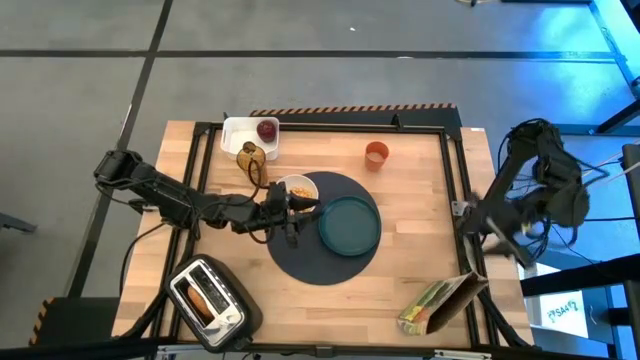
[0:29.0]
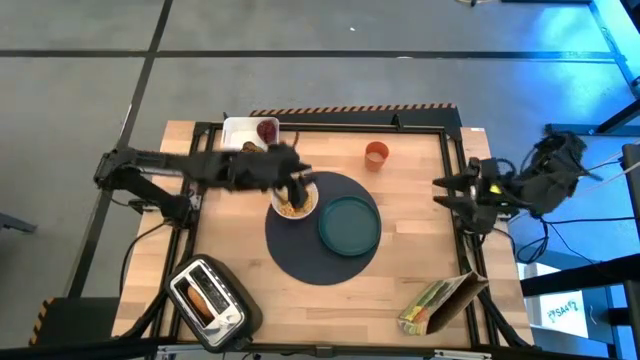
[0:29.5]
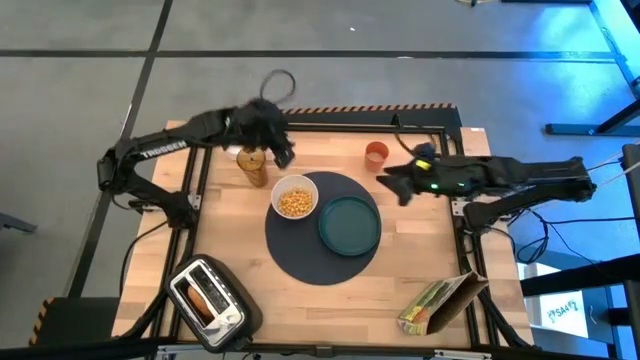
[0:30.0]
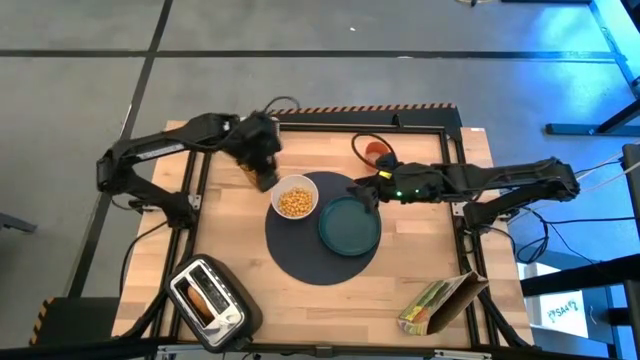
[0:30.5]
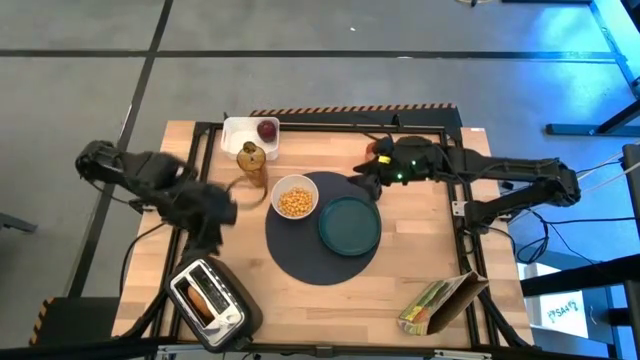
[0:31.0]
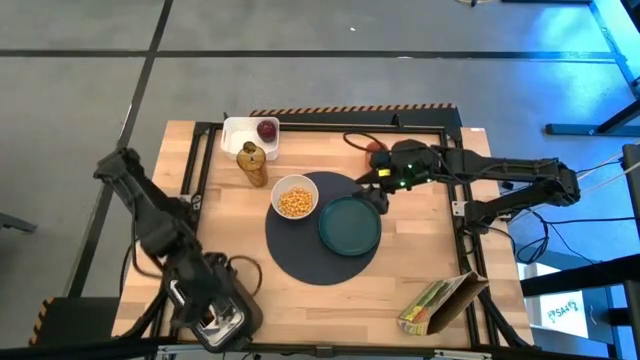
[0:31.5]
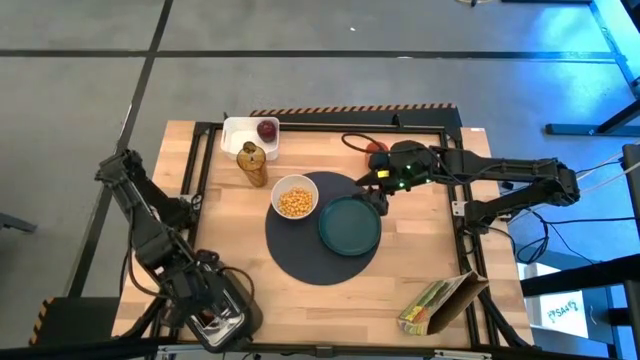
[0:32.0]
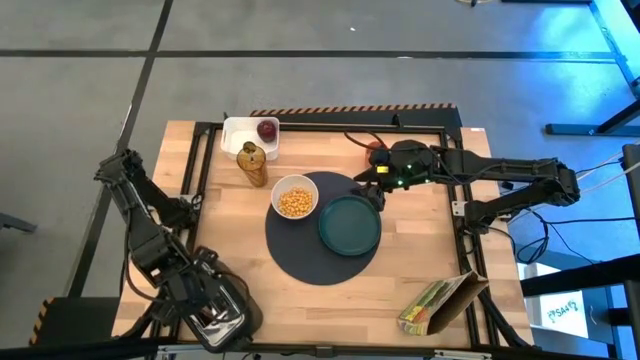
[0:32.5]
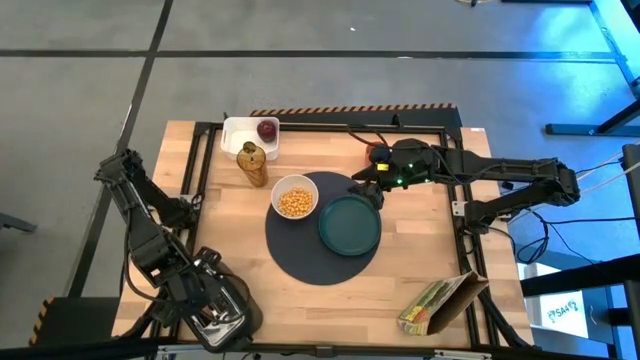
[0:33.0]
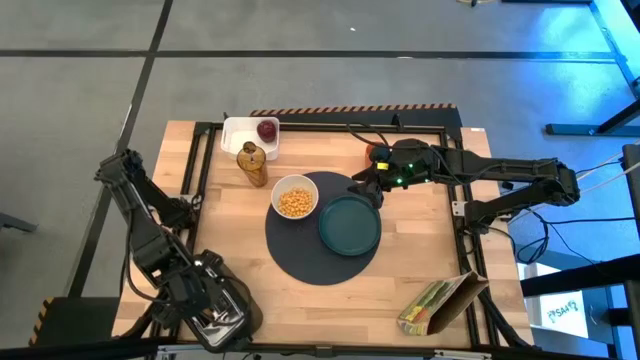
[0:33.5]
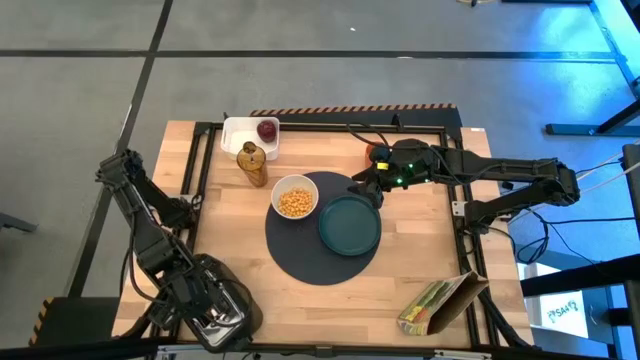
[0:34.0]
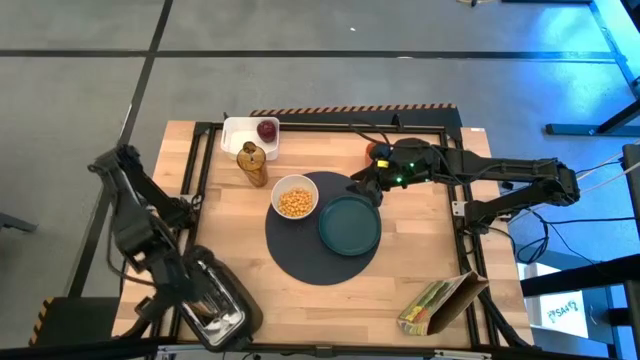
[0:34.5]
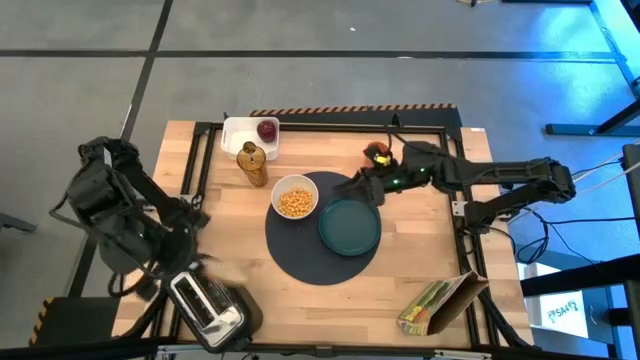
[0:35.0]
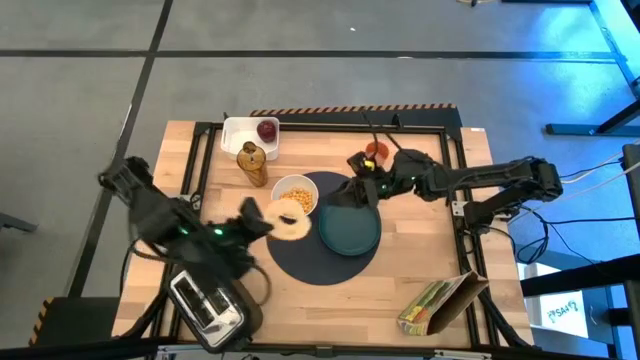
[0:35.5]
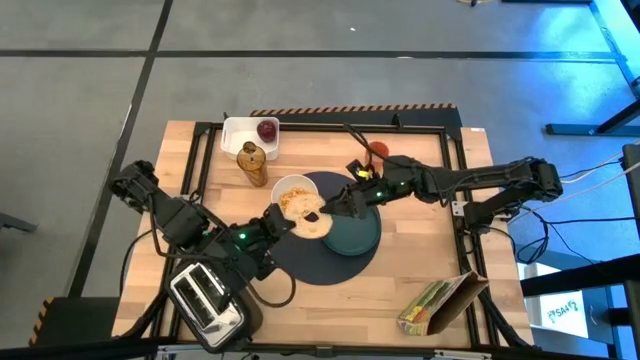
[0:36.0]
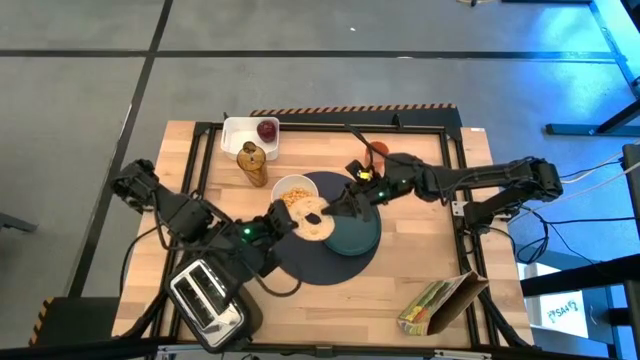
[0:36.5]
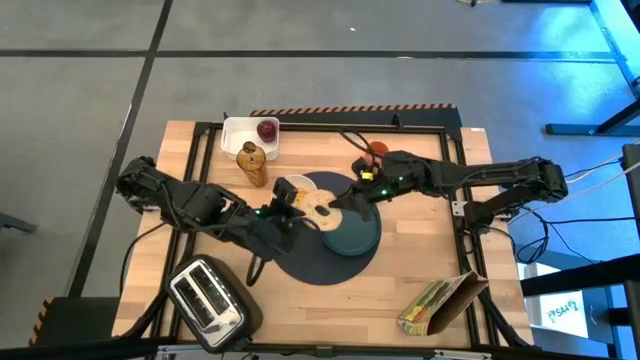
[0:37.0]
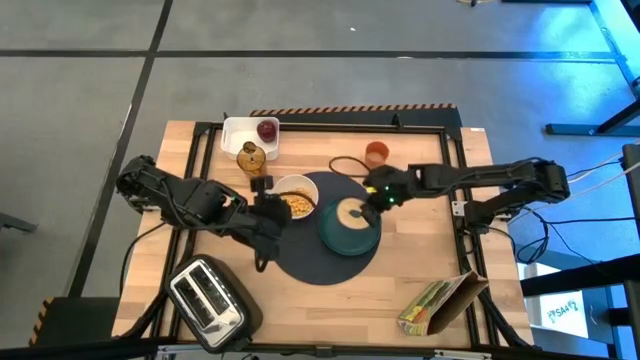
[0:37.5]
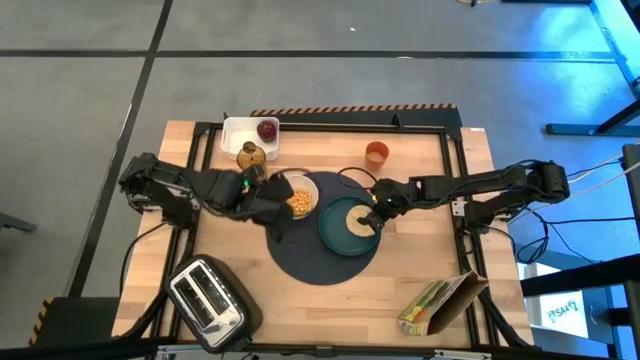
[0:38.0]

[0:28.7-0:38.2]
Task: Arrange a breakfast setting
Put the toasted bagel on the green plate

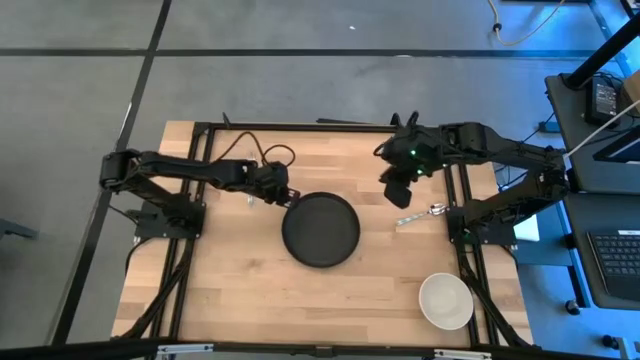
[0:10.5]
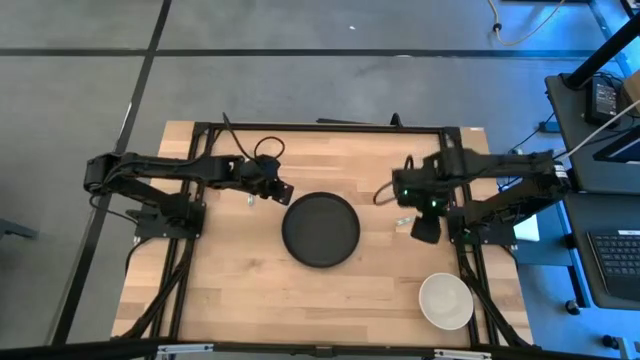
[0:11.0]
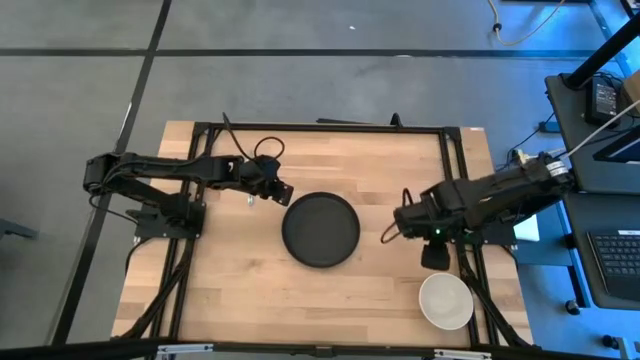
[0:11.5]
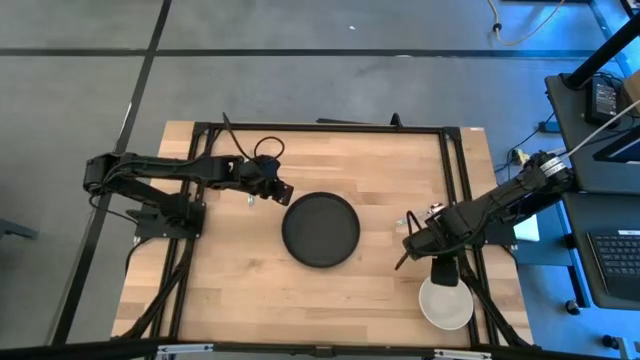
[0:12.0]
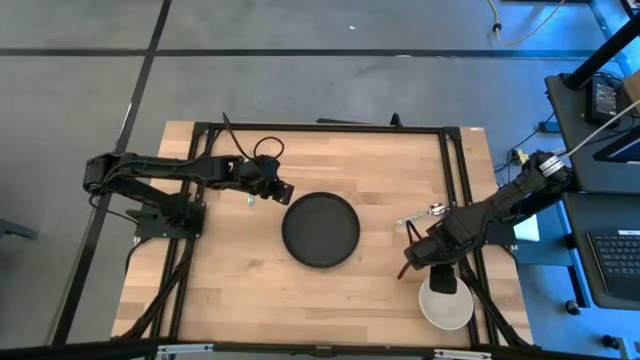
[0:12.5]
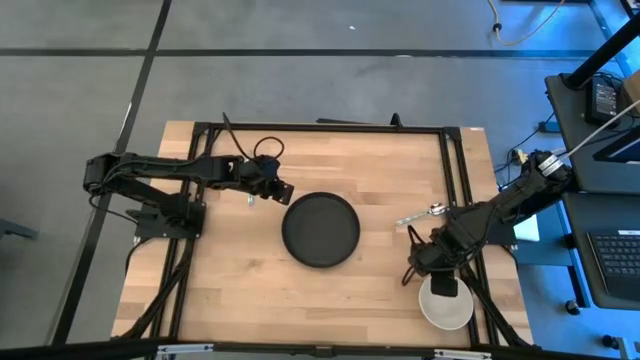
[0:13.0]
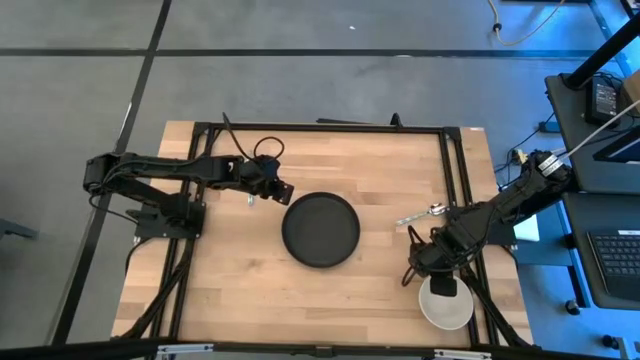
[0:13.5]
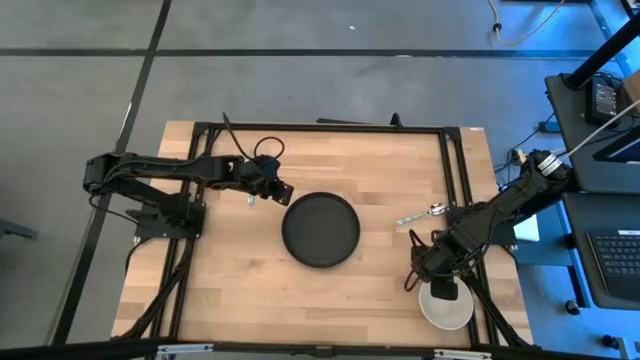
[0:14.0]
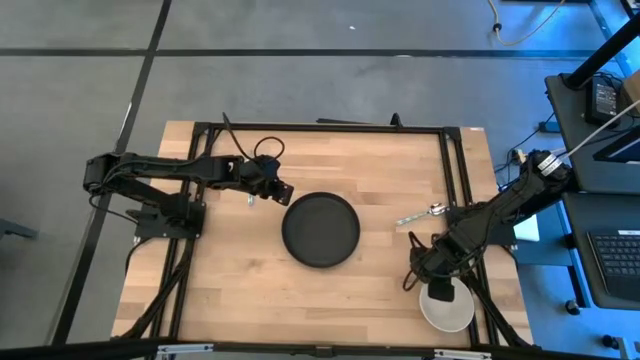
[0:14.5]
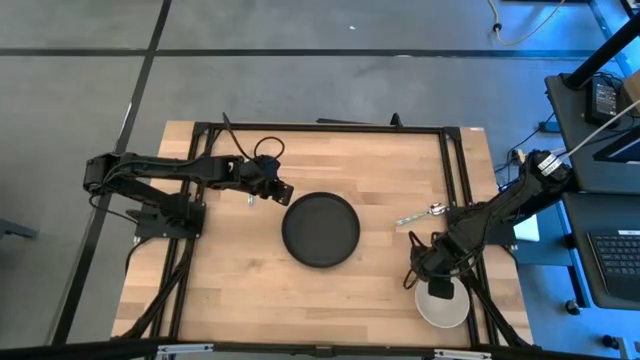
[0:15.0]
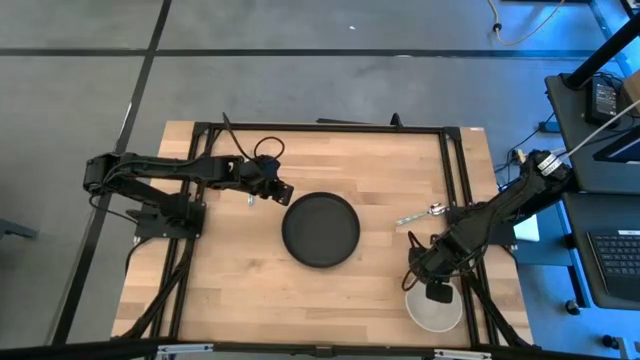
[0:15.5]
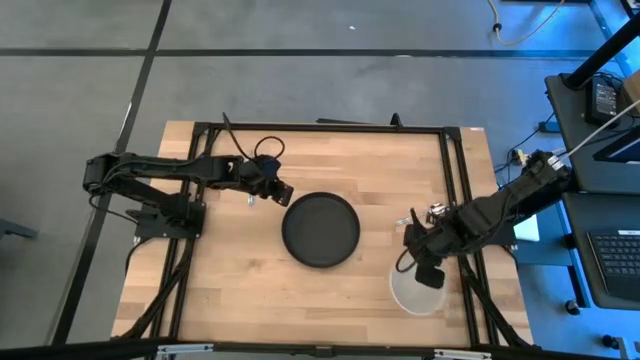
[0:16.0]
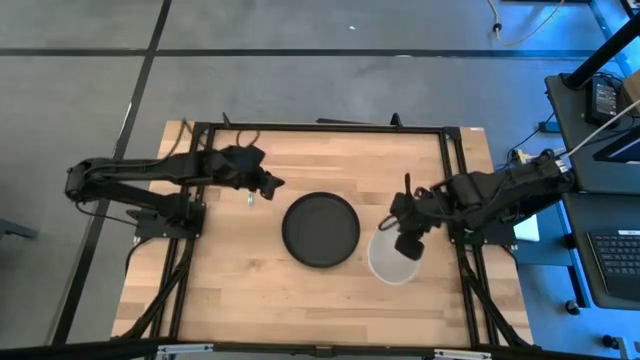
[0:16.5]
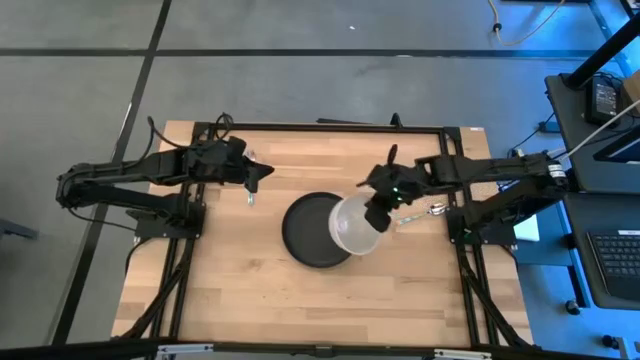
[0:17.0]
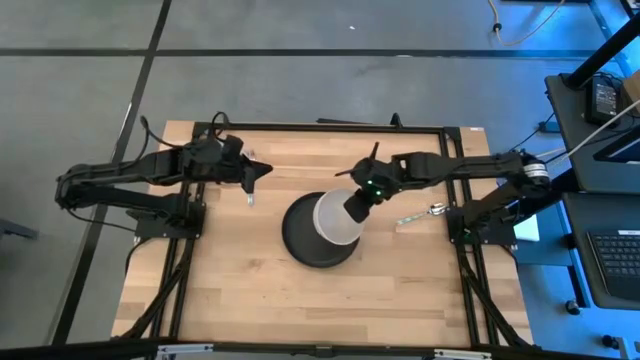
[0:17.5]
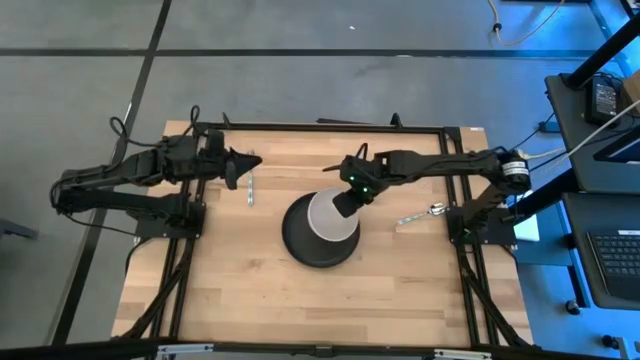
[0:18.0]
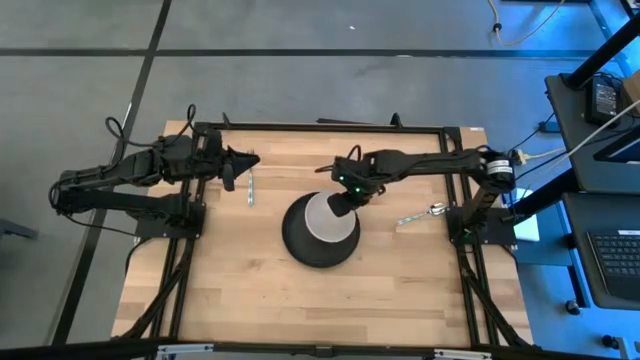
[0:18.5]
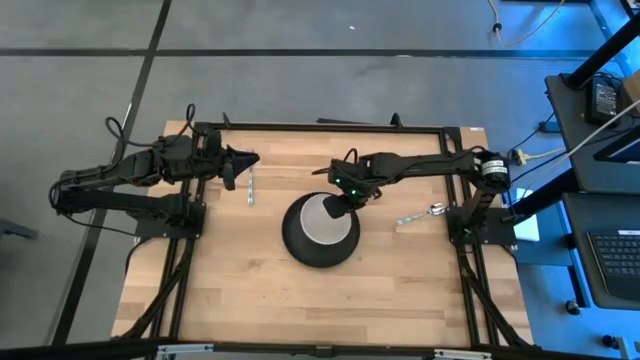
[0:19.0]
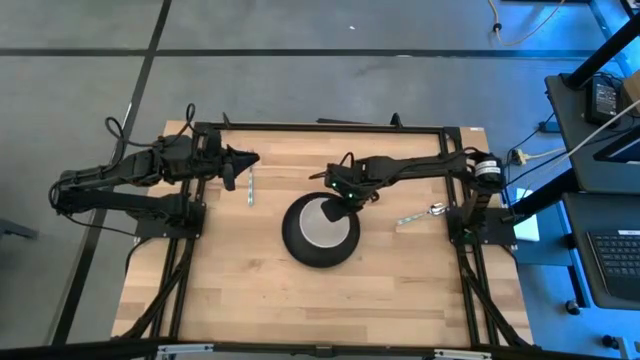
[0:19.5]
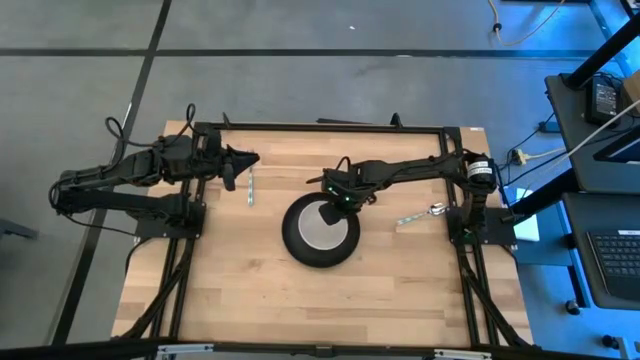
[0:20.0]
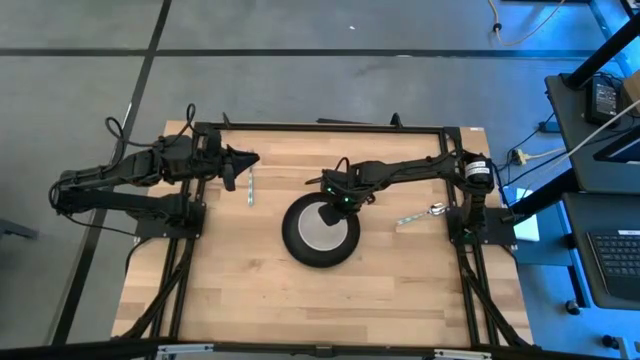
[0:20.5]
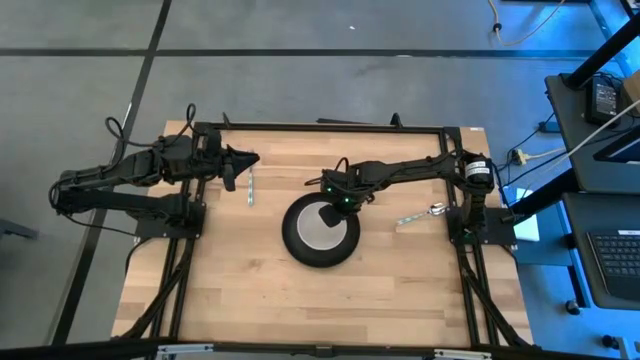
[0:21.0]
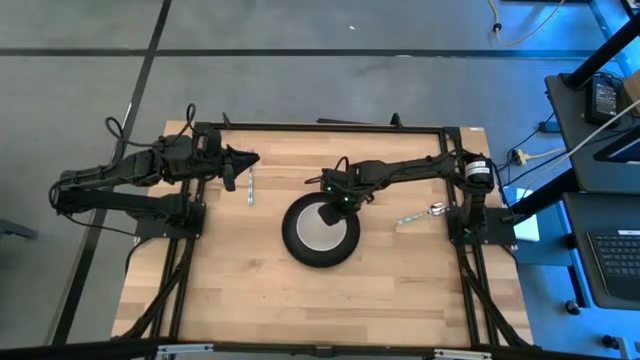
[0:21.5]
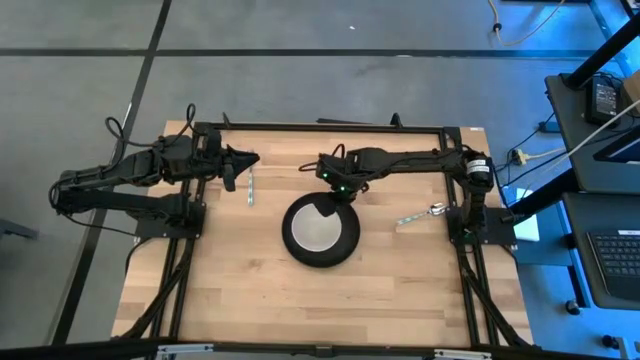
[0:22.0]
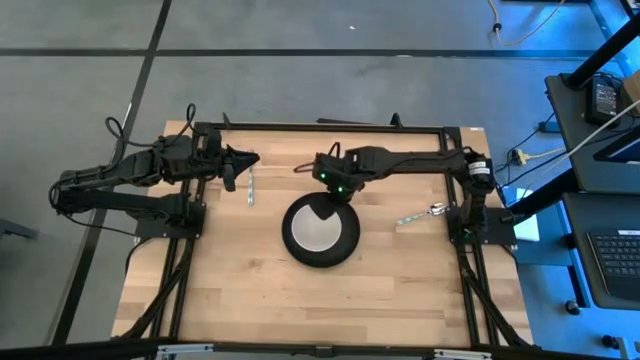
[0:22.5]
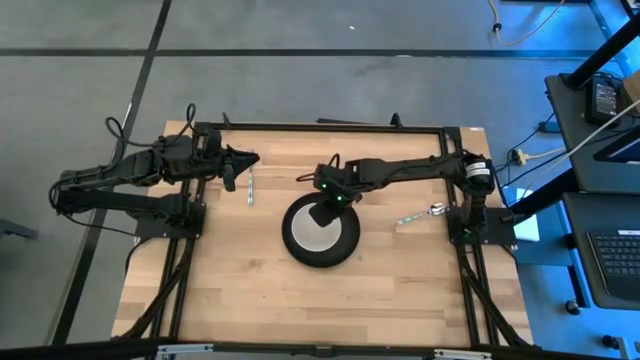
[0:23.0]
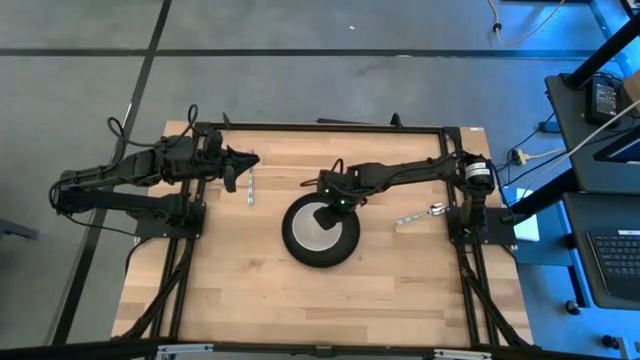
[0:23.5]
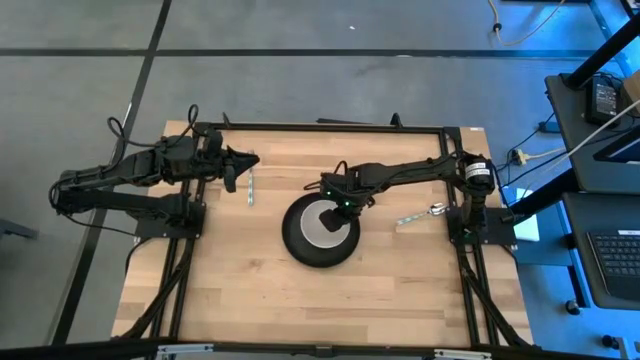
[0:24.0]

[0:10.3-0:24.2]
Task: Pick and place plate/cup/fork/spoon on tray
Stack the white bowl on the black plate
